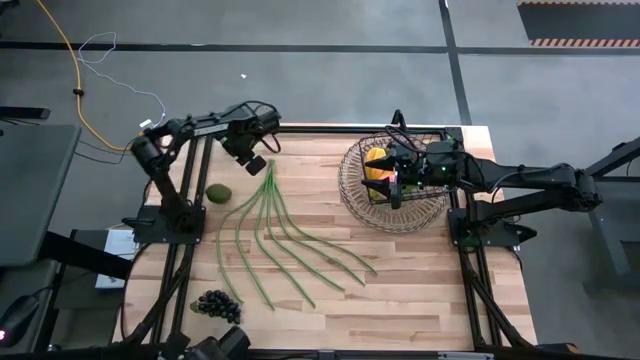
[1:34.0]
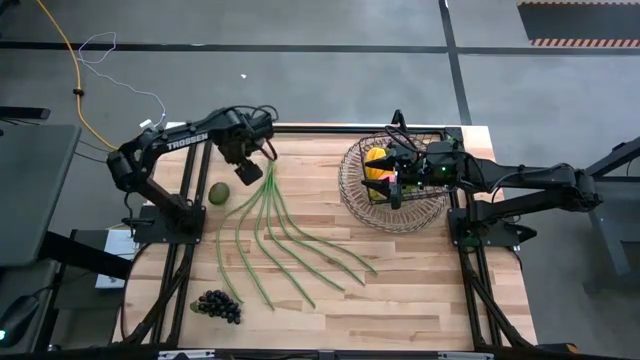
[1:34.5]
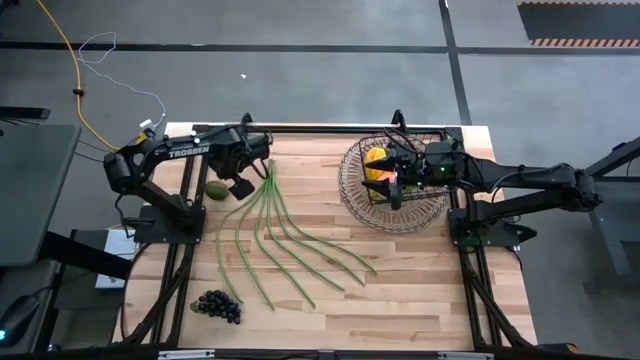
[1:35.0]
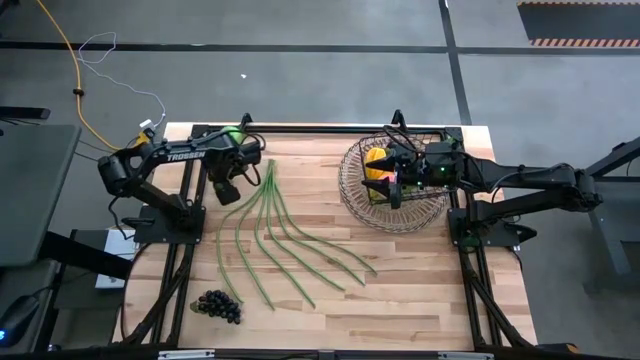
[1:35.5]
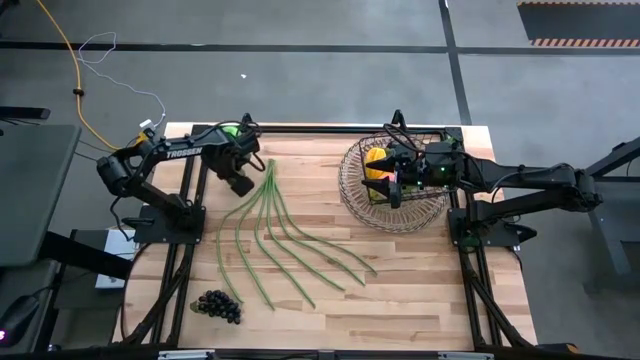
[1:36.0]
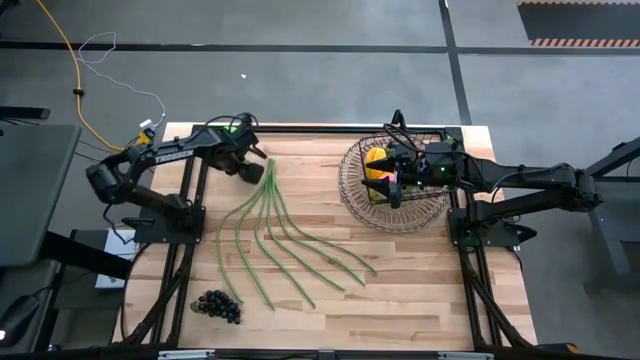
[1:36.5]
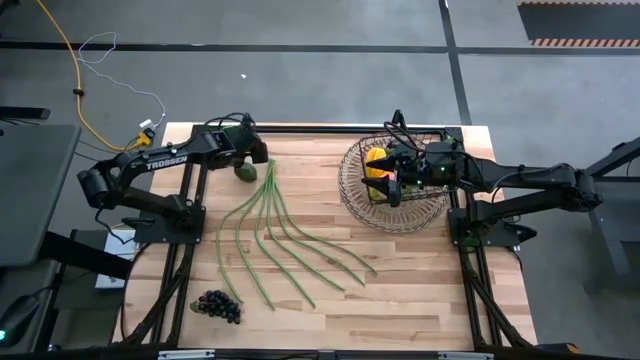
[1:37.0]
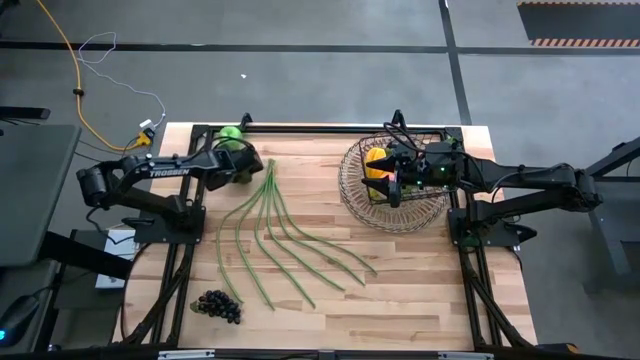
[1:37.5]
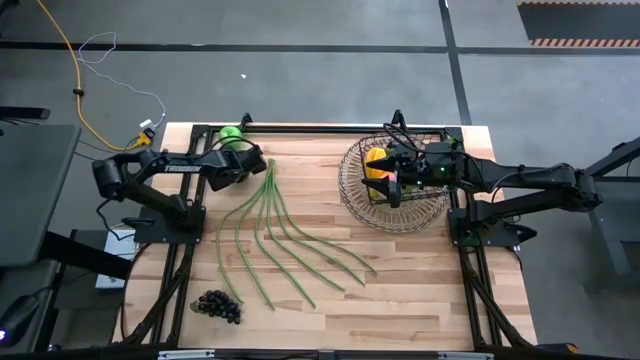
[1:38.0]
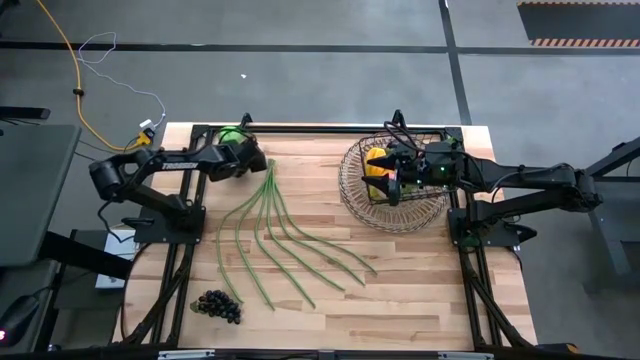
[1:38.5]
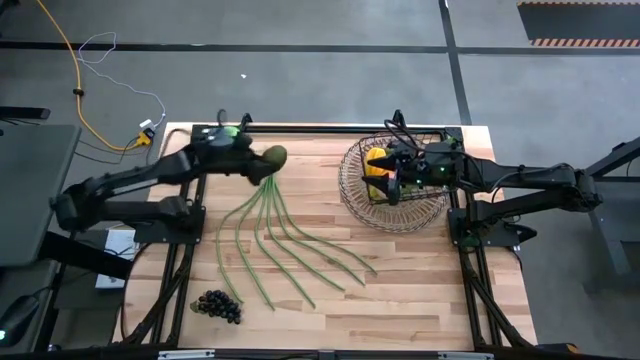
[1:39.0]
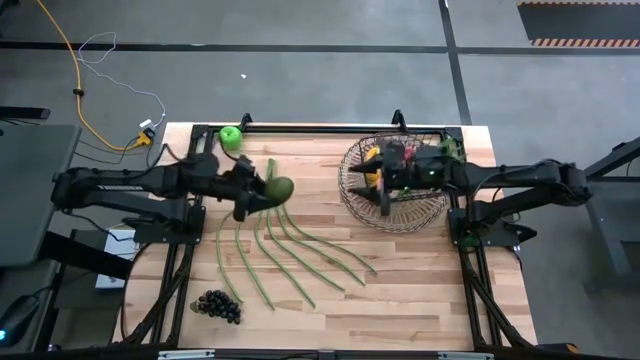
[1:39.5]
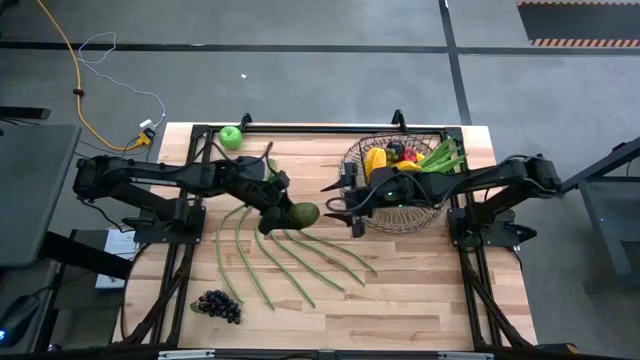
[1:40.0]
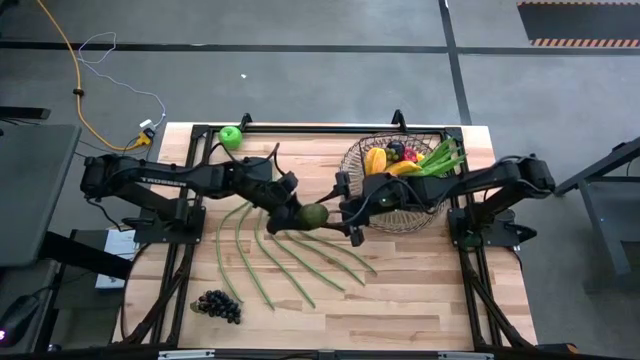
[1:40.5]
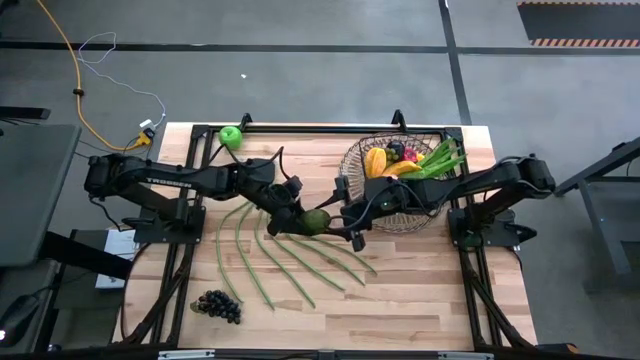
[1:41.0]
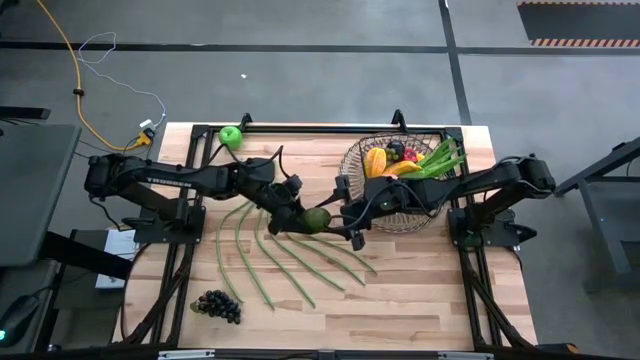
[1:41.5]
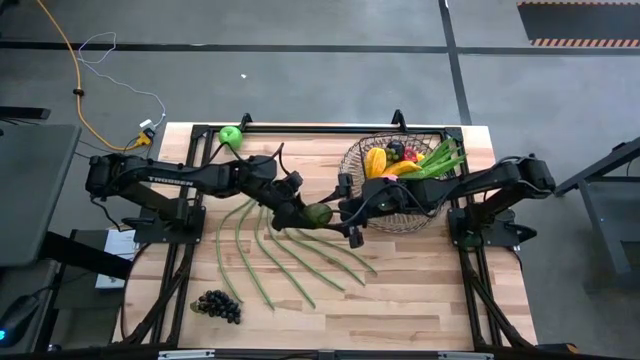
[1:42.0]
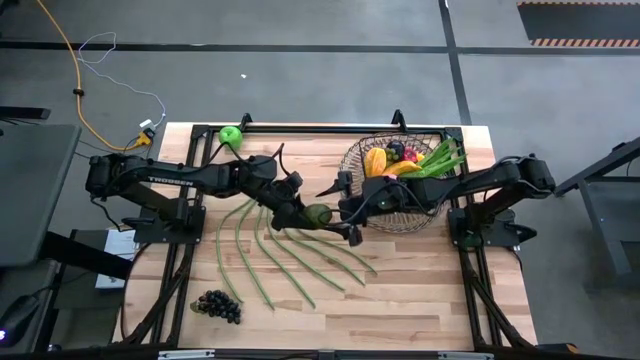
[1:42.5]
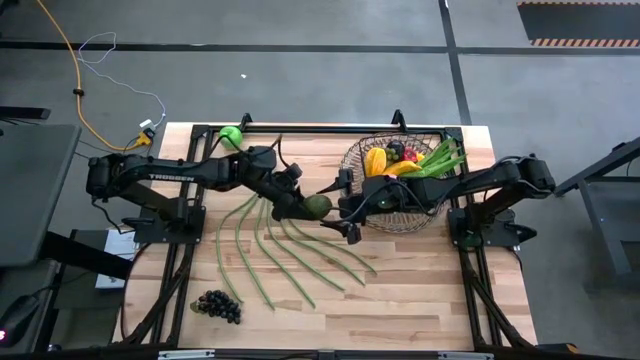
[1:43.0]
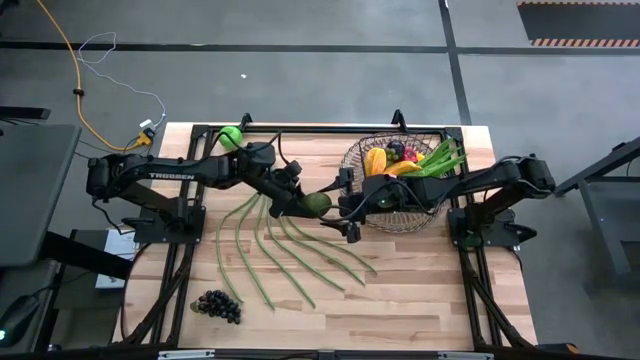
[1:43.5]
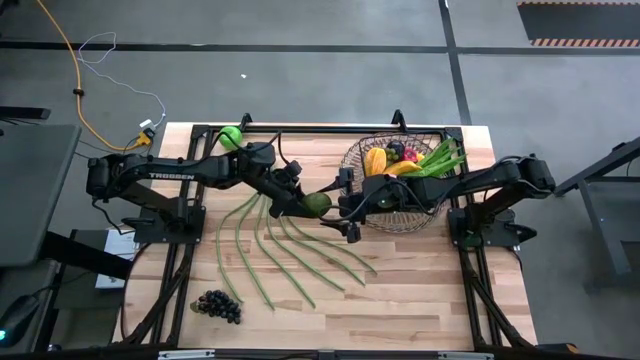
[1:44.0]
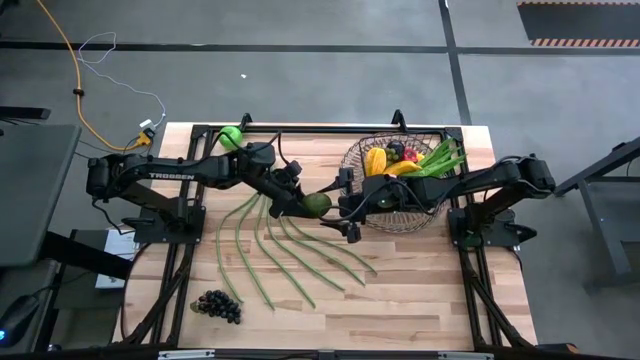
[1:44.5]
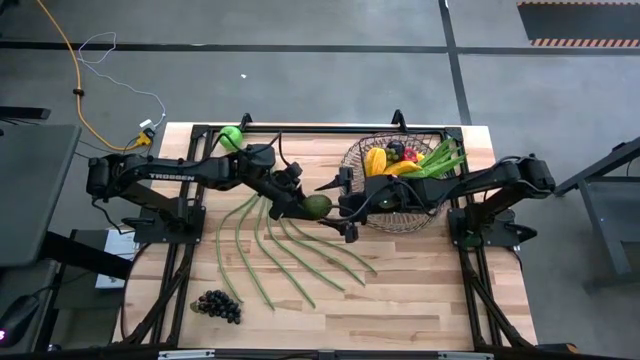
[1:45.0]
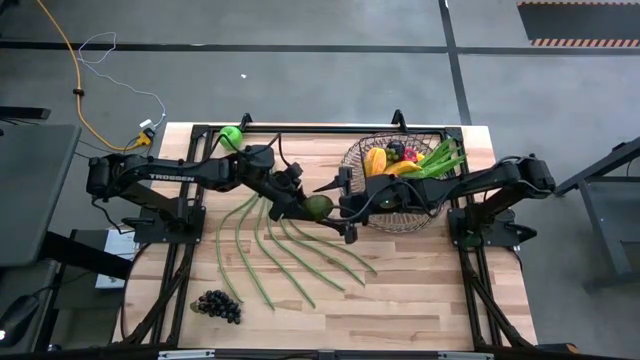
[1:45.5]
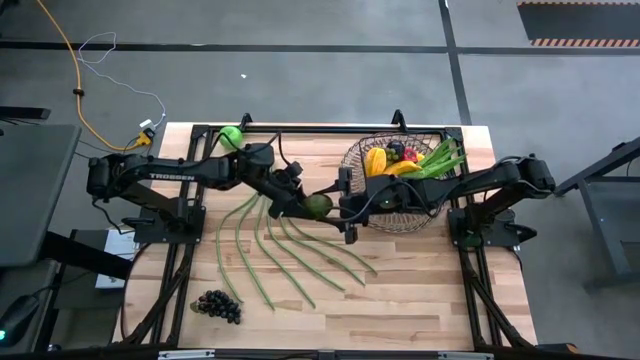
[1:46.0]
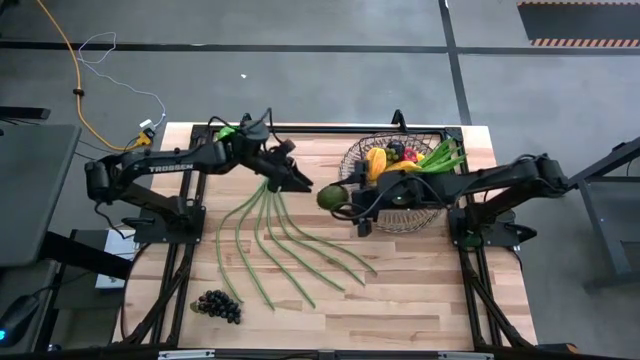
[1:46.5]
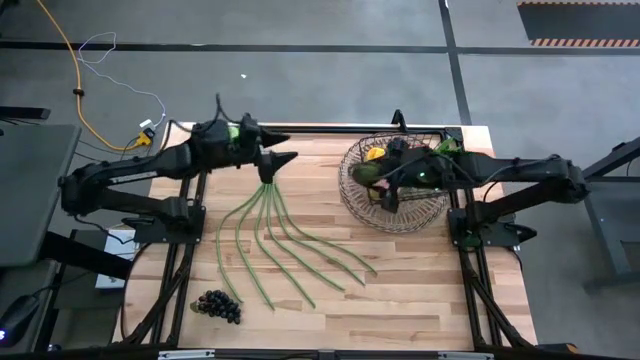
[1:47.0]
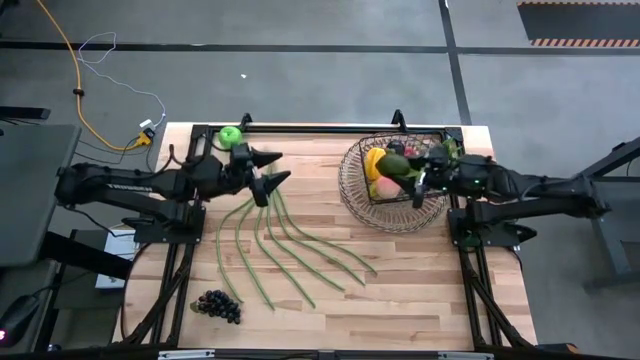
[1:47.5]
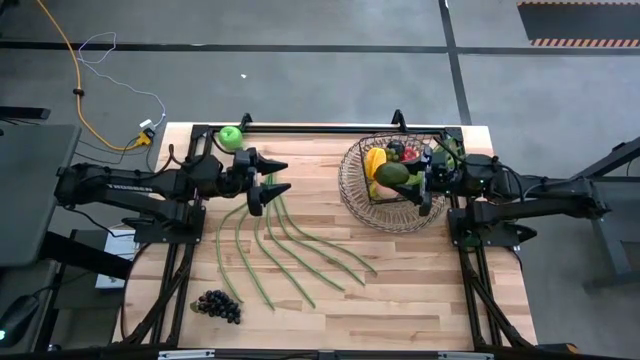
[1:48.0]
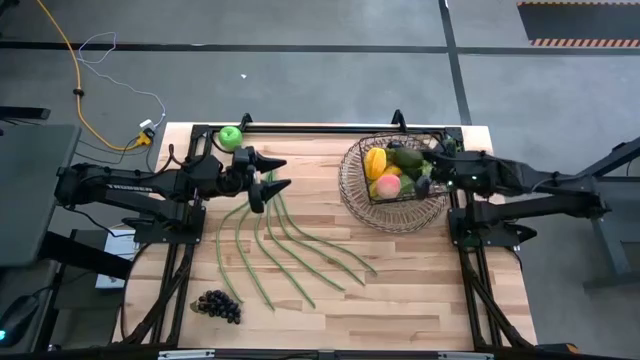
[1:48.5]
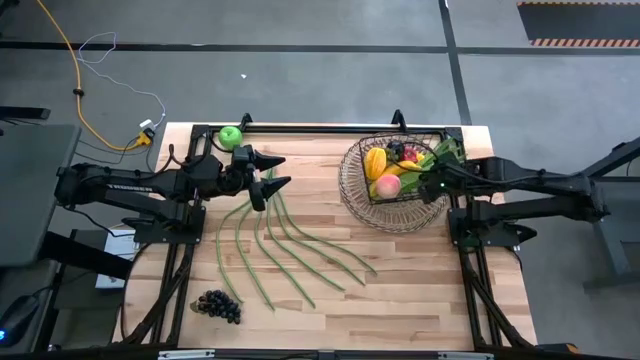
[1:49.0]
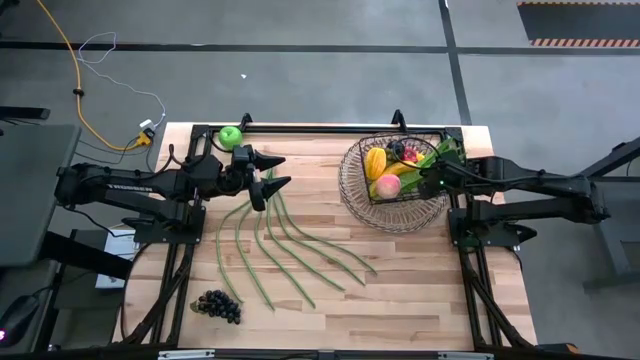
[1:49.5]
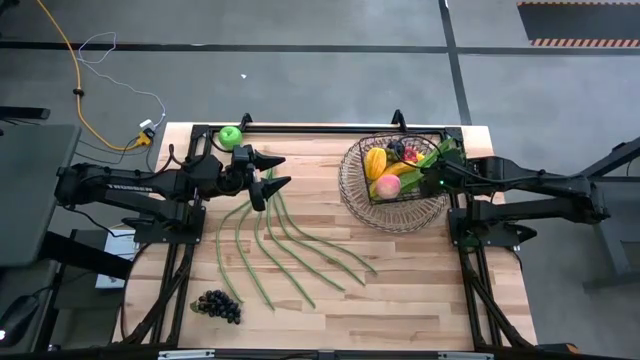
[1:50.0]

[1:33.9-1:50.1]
Task: Build produce basket
Put the green lime into the wire basket

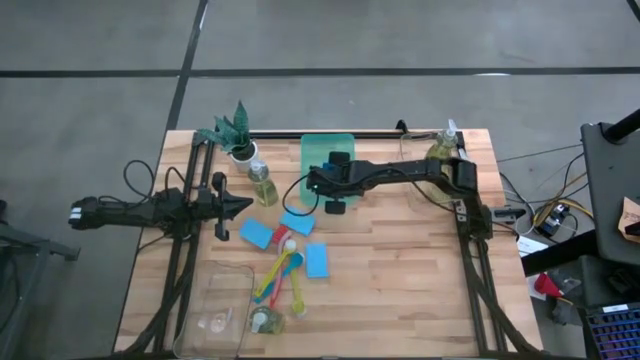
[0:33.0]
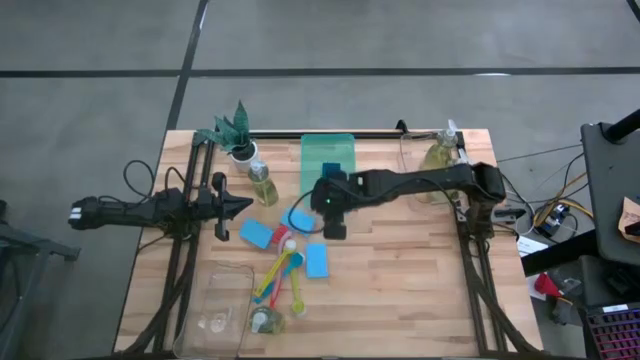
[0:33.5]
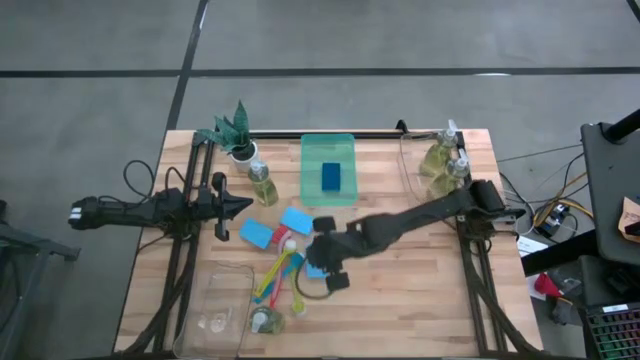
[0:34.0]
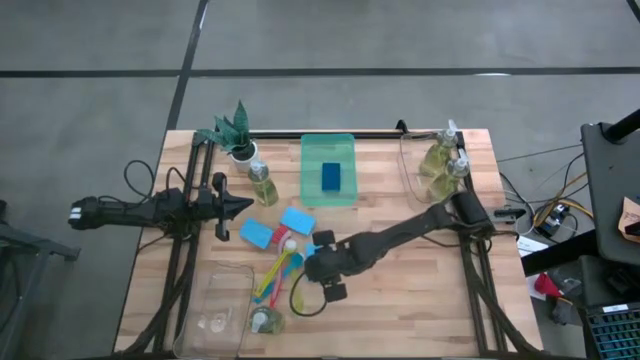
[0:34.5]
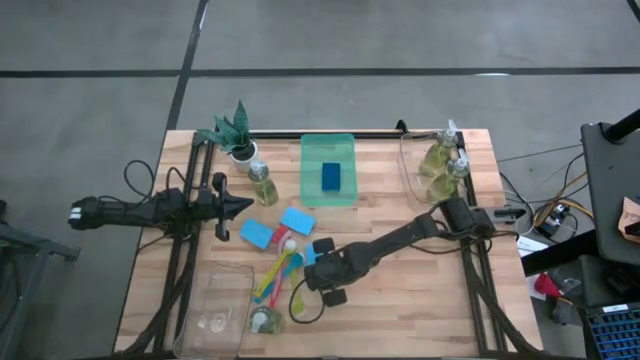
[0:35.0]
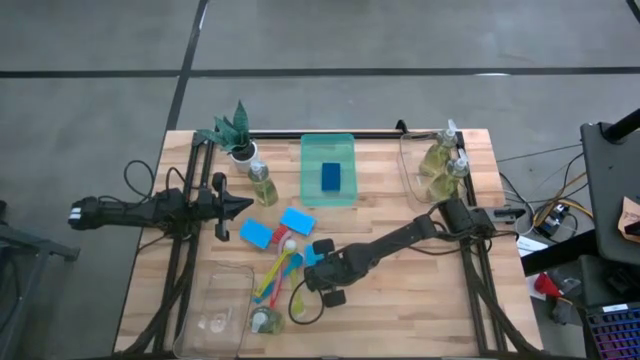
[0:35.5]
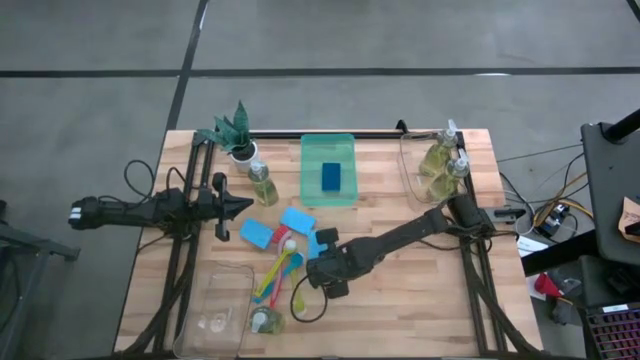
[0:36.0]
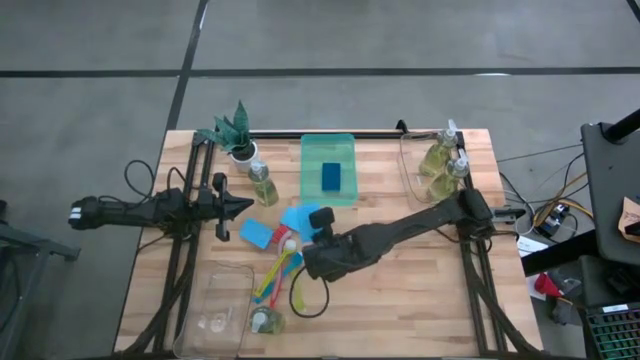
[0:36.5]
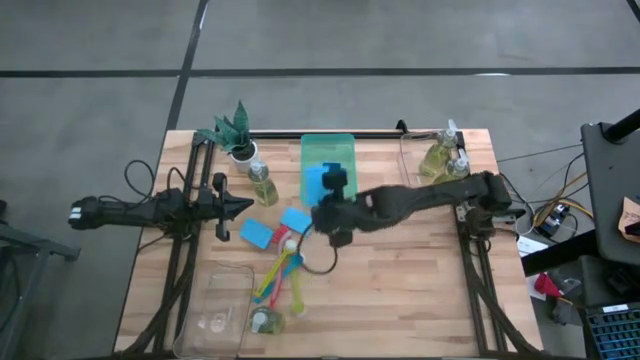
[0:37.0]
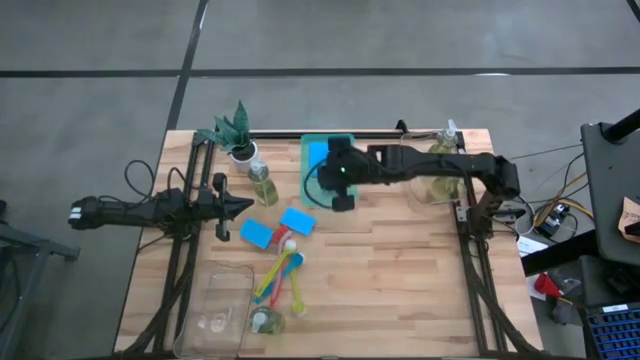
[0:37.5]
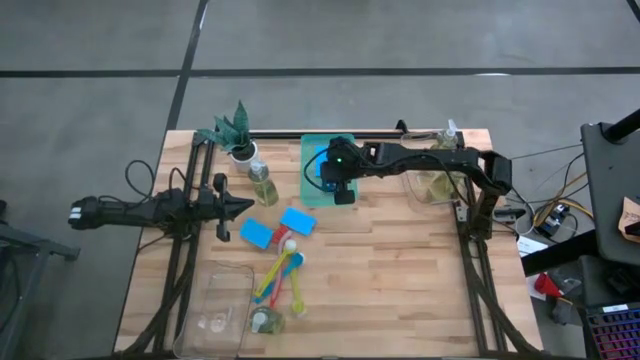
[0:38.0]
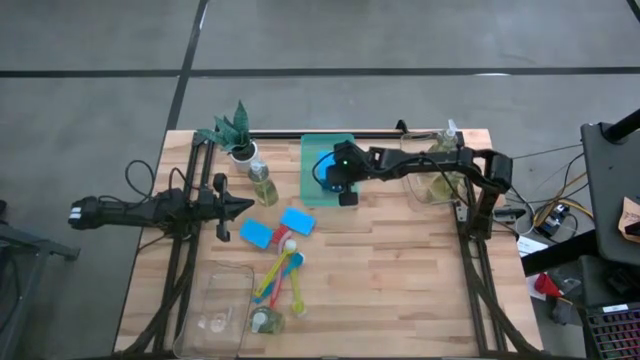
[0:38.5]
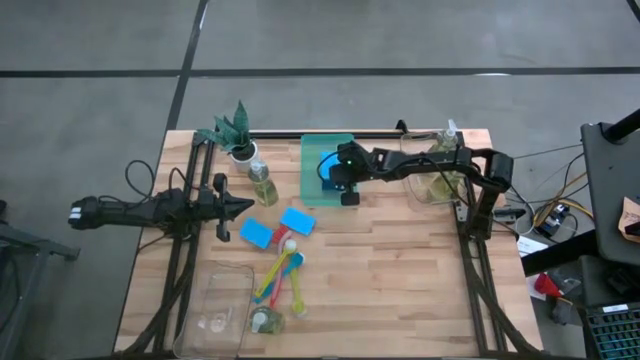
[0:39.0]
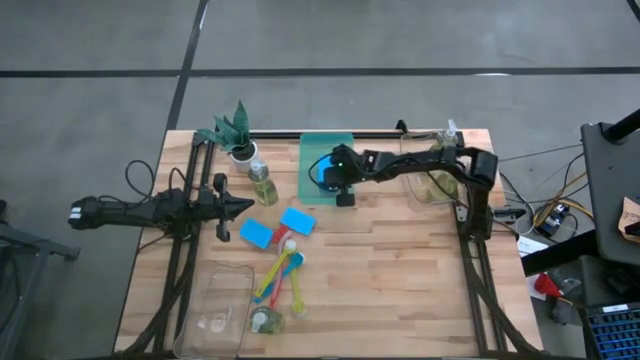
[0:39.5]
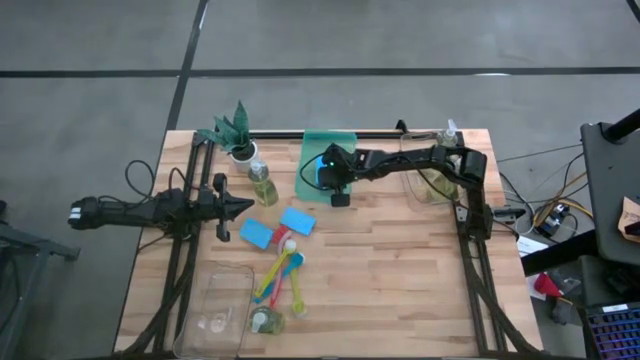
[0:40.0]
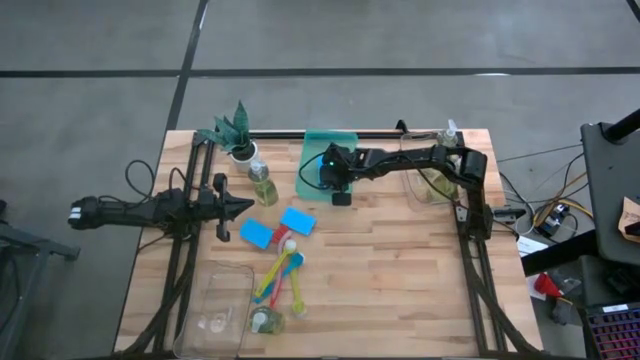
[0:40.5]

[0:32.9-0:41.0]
Task: Pick & Place Kitchen Sink Supplies
Put the blue sponge into the green bin
